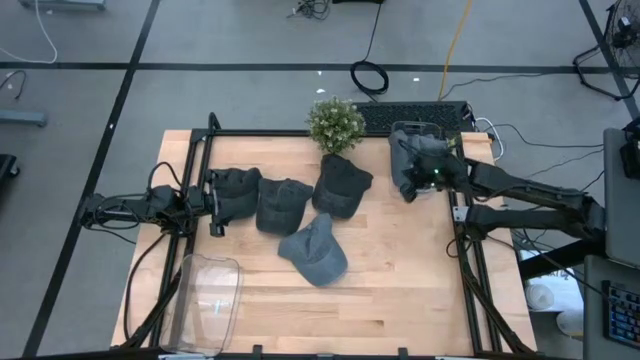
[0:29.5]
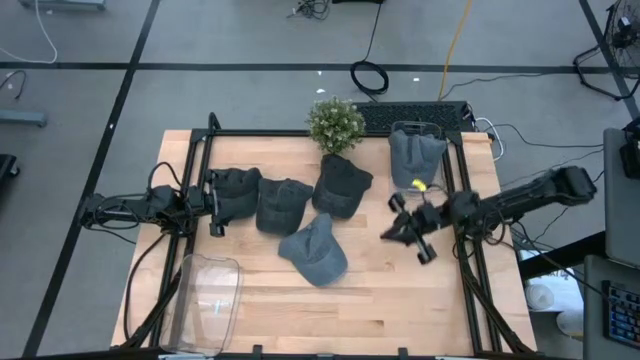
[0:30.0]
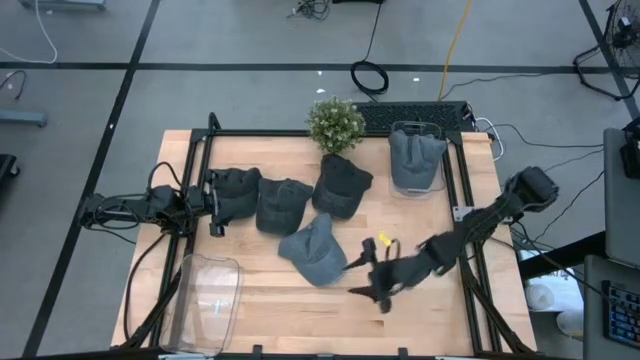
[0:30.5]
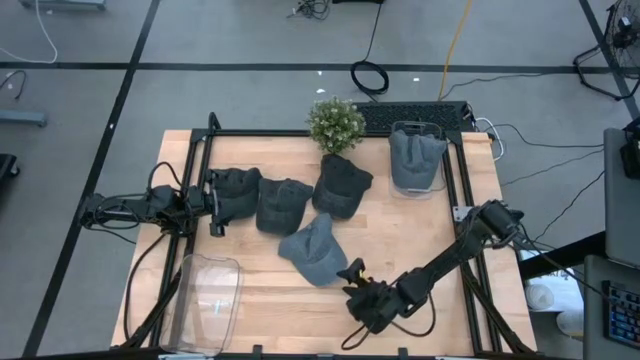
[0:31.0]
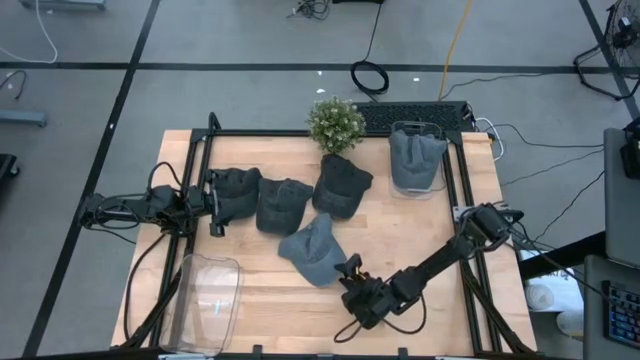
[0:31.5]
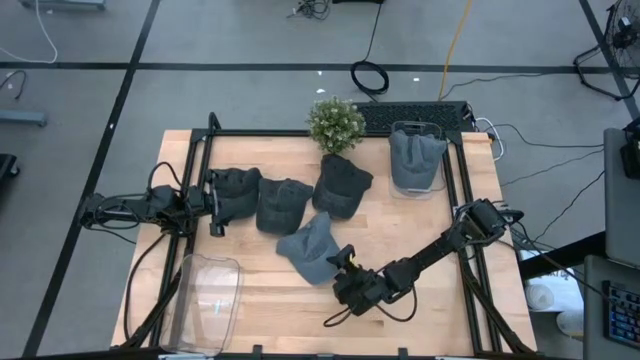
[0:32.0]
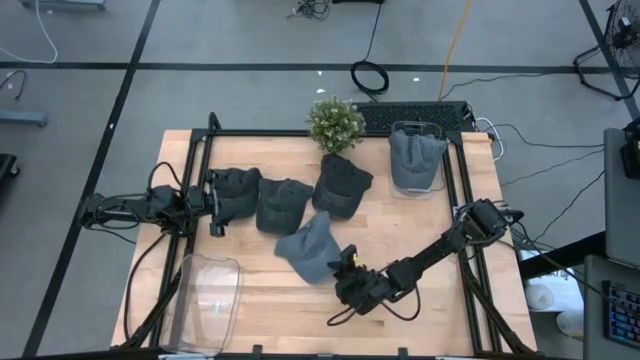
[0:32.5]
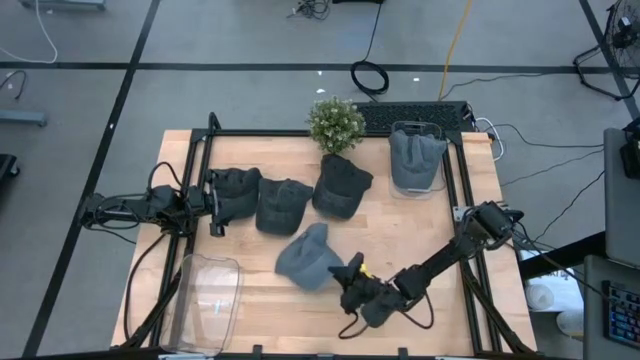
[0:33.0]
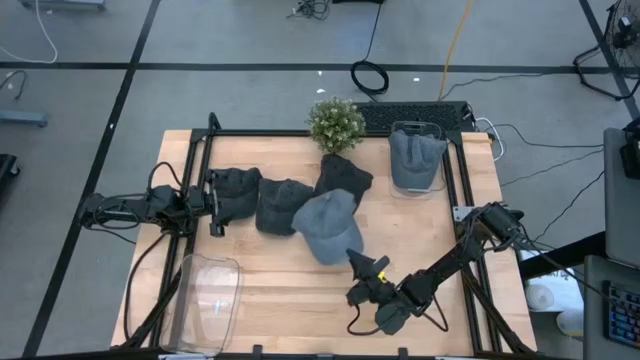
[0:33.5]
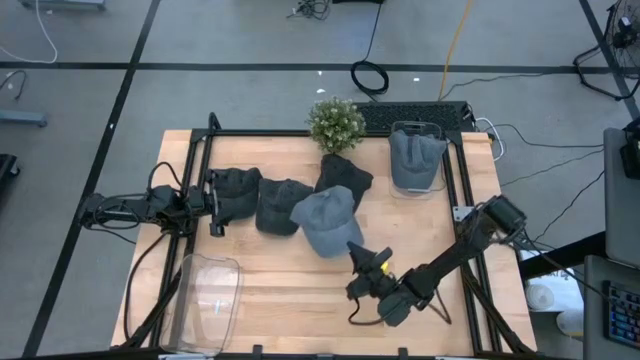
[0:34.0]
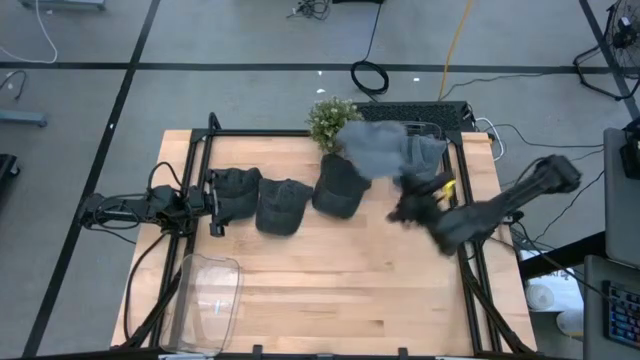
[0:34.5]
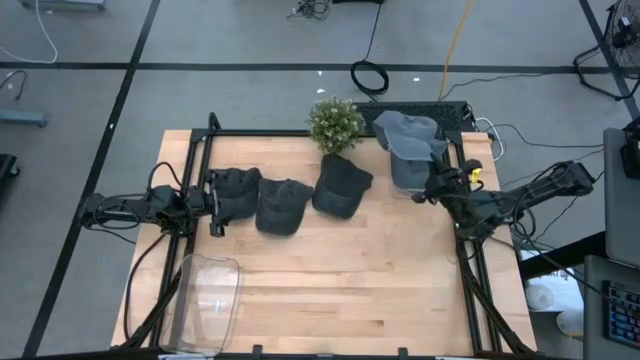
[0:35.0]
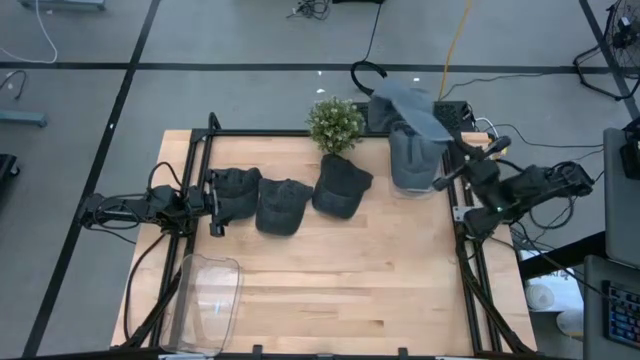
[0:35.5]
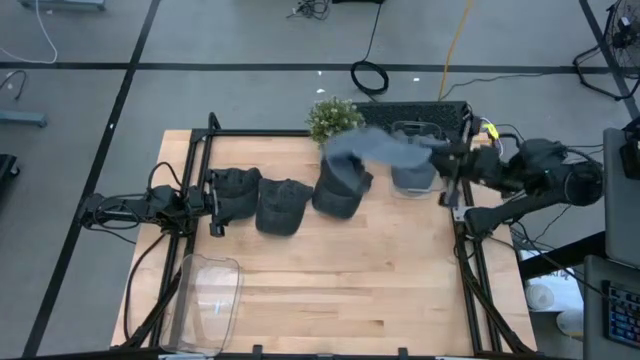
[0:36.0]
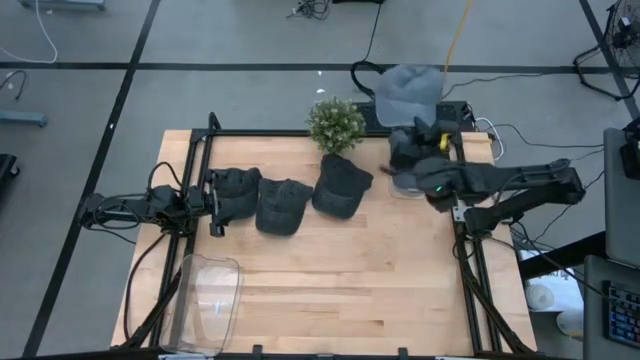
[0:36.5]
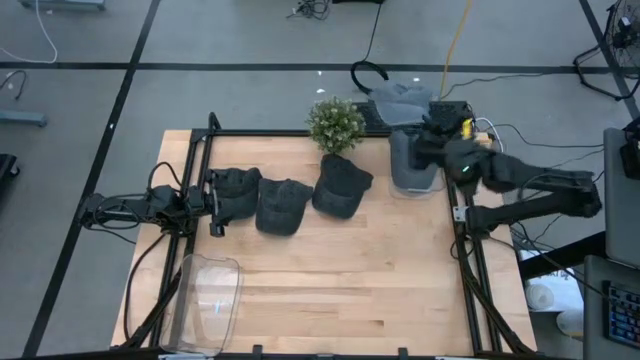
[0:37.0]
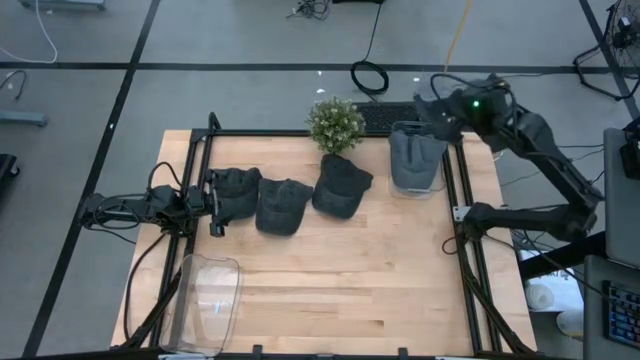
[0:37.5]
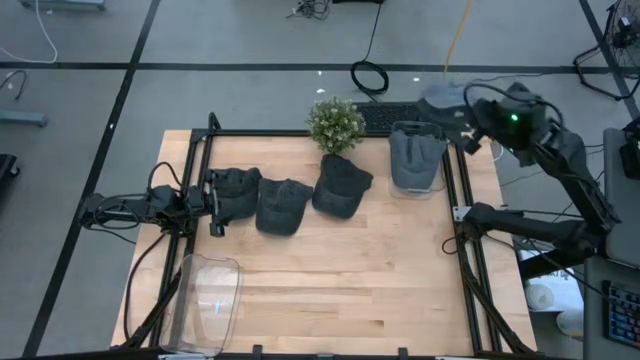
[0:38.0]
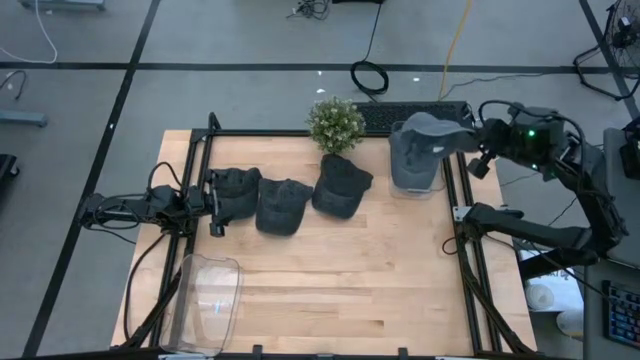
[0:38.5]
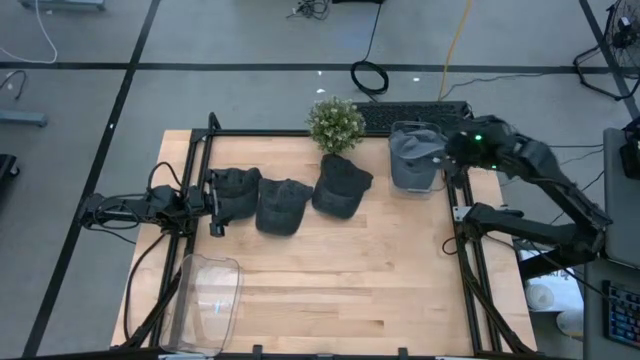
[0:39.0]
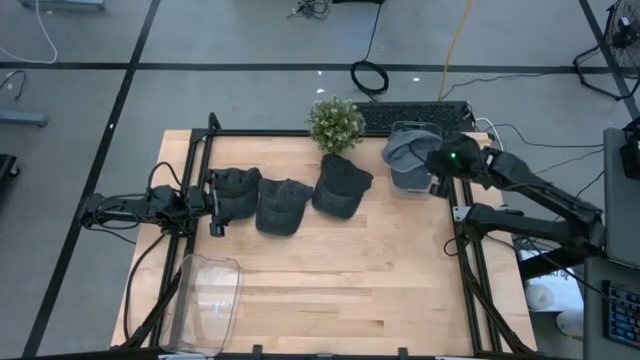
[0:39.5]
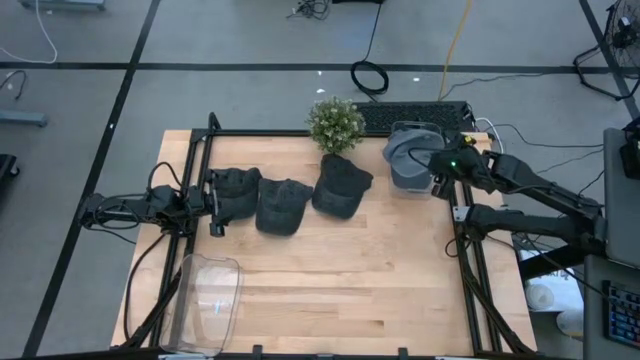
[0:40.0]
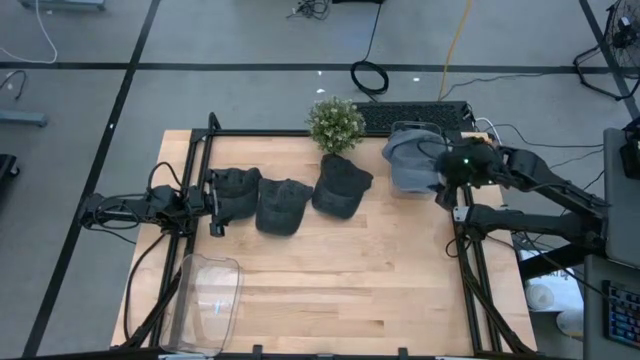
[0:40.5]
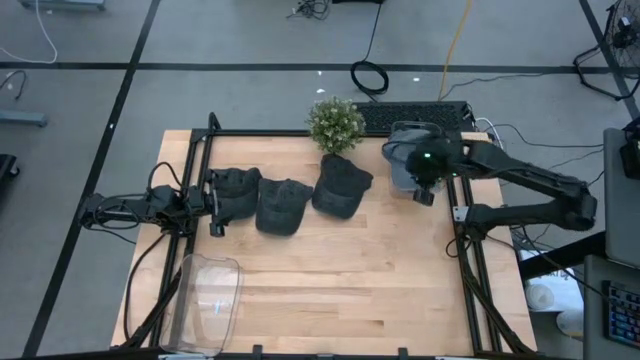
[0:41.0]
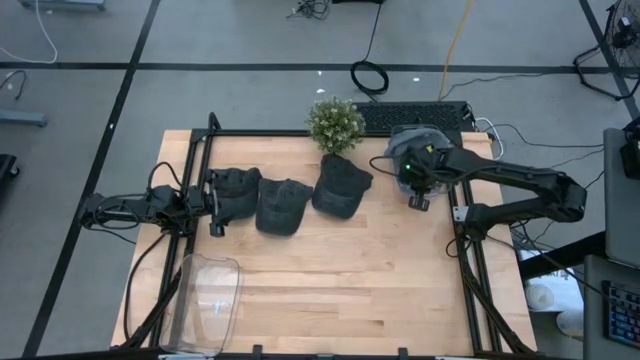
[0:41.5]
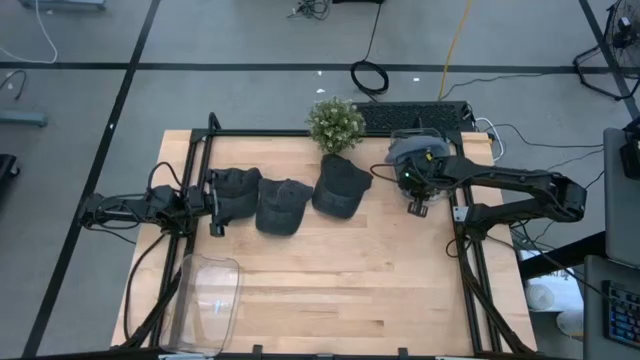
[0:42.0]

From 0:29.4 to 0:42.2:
Task: Pick & Place hat
Put the gray cap into the top transparent bin

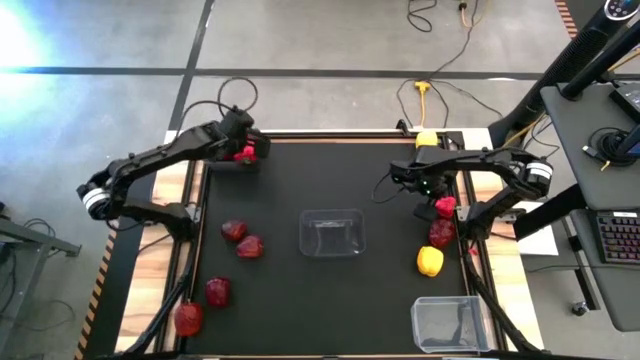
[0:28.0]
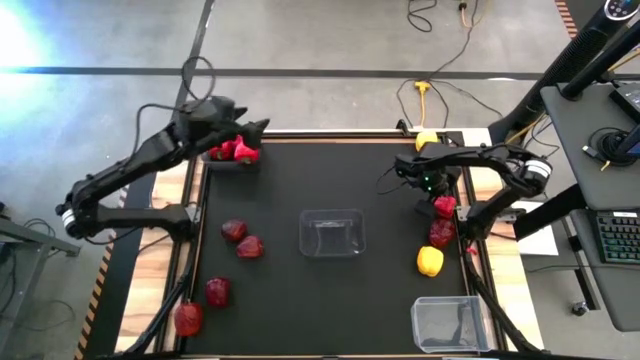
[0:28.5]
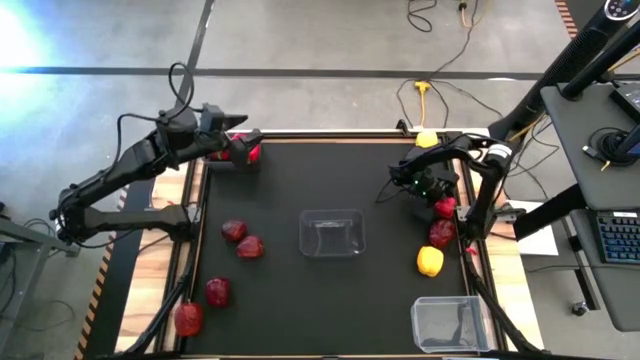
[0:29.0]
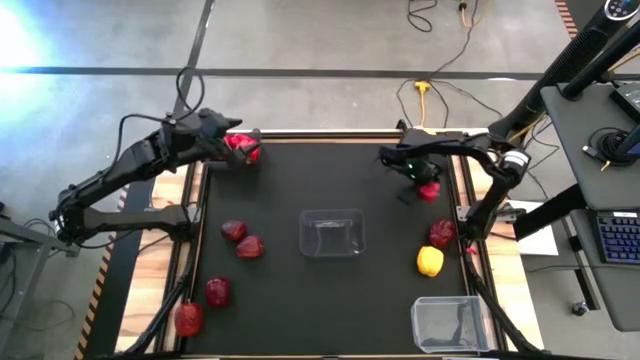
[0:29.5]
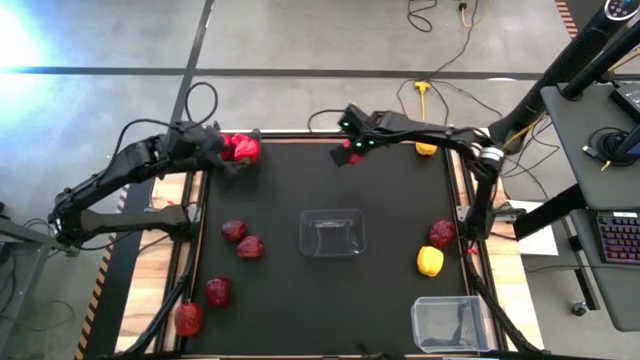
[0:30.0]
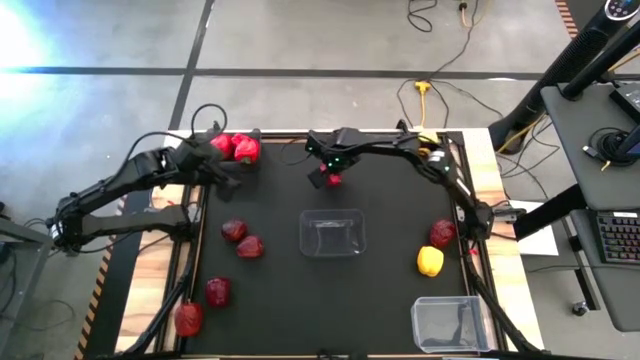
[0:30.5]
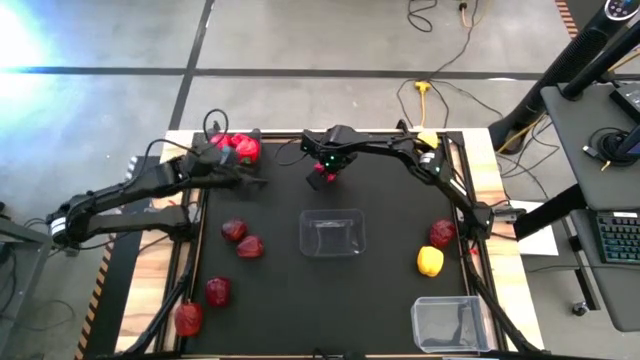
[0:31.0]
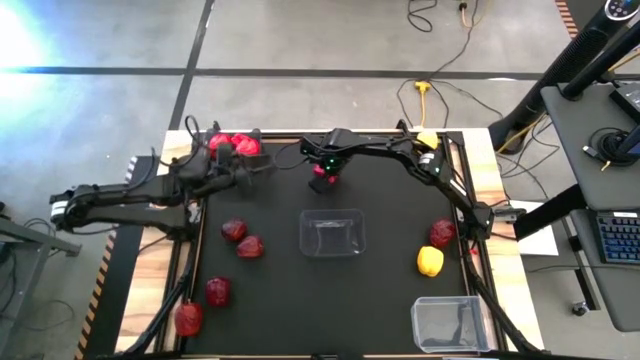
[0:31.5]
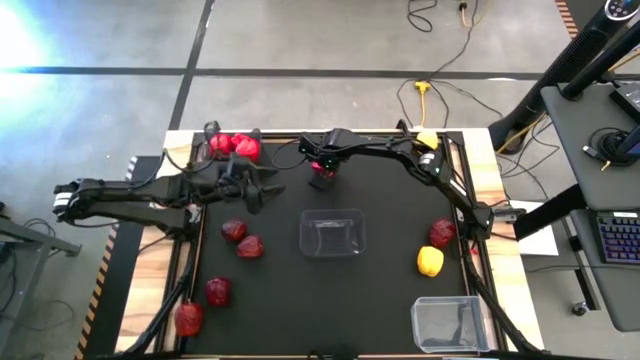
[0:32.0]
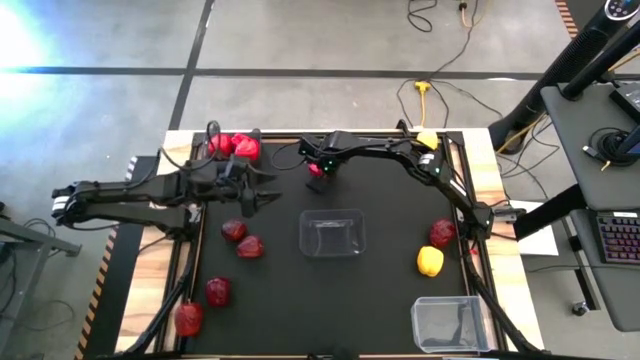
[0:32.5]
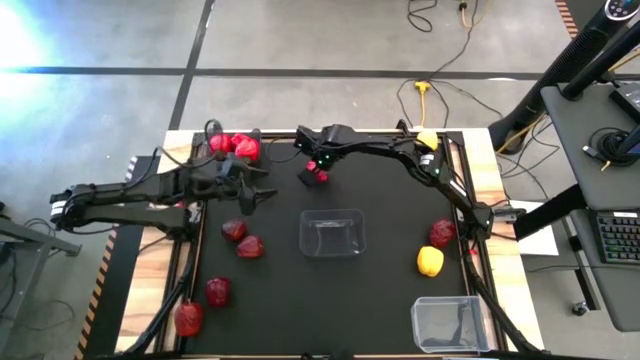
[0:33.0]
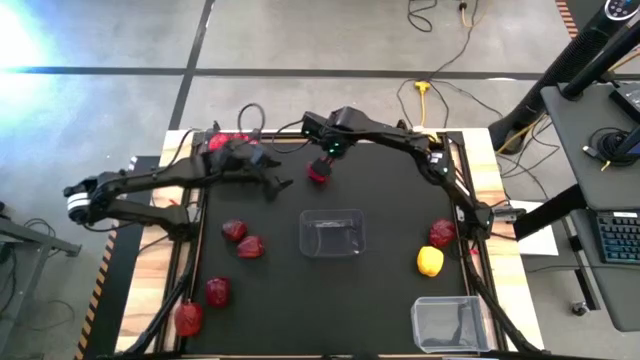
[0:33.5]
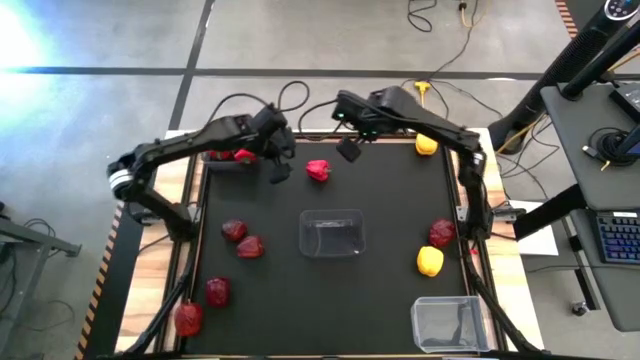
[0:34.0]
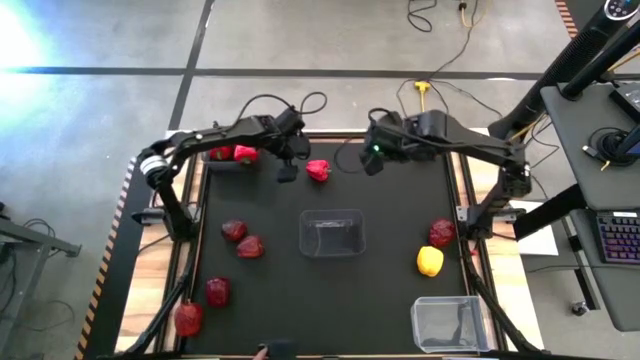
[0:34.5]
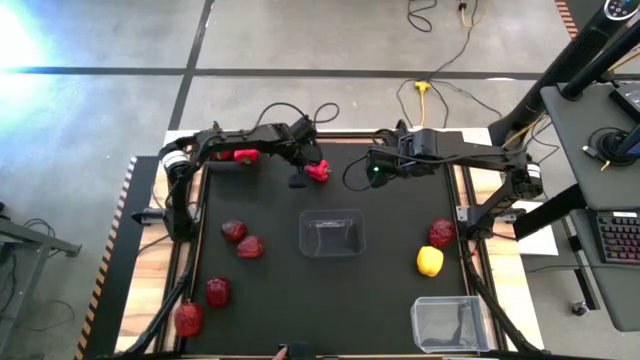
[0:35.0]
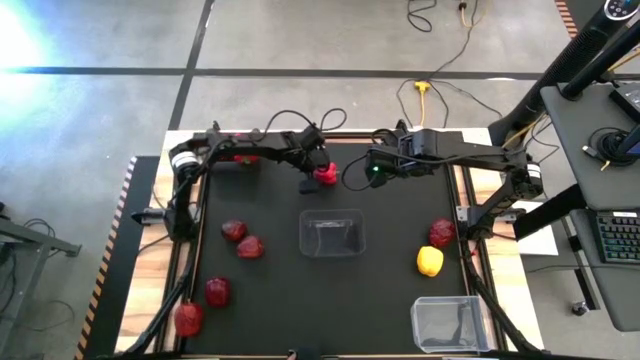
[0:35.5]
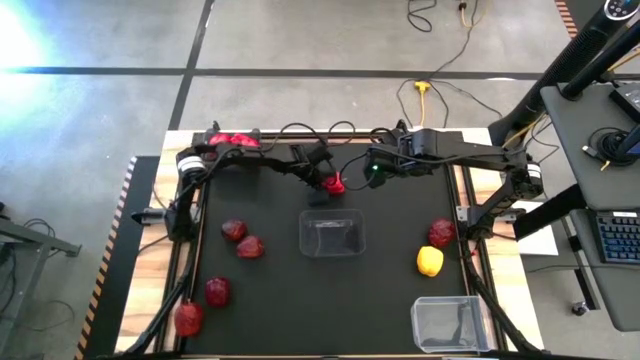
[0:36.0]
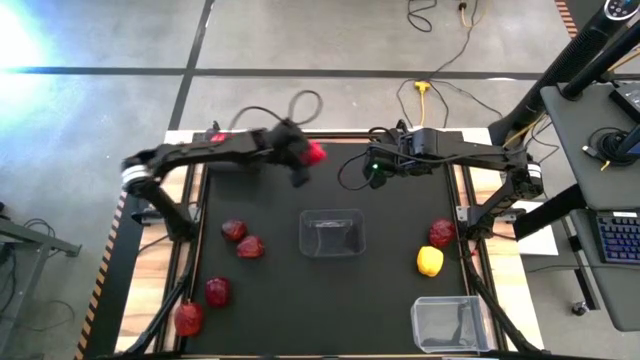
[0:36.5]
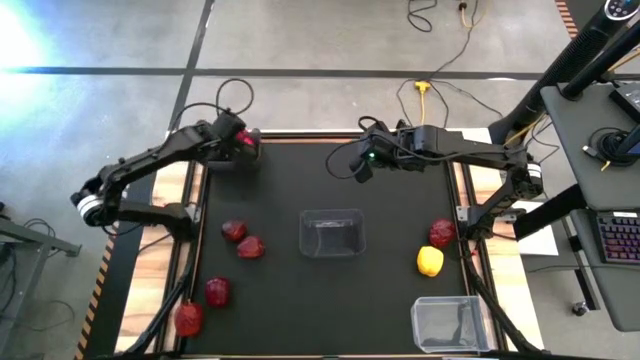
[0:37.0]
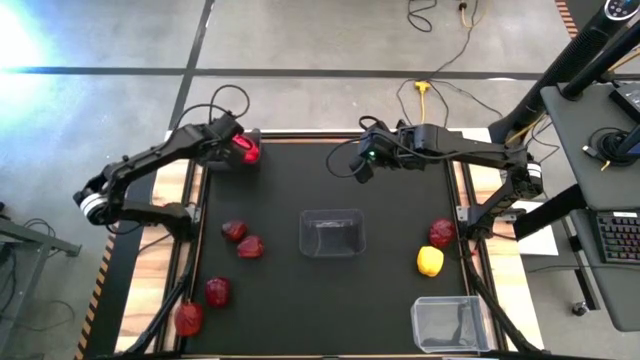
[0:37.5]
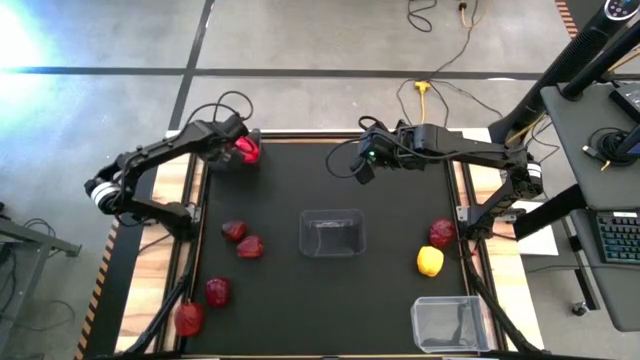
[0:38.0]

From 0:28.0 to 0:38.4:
Task: Sort produce into baskets
Put the red bell pepper into the top black bin
